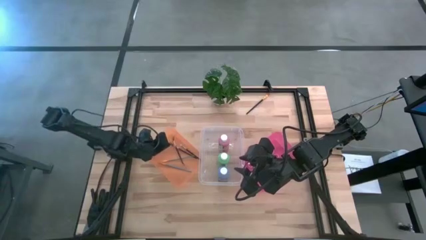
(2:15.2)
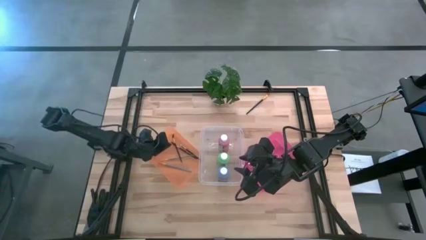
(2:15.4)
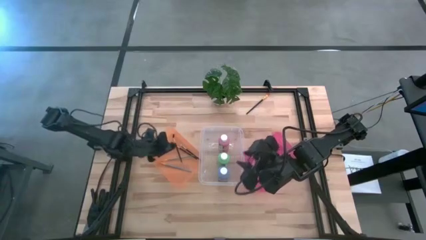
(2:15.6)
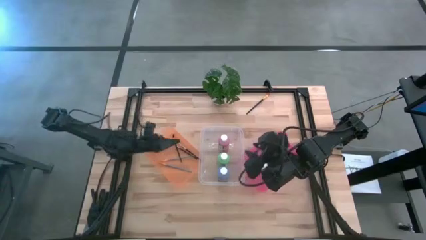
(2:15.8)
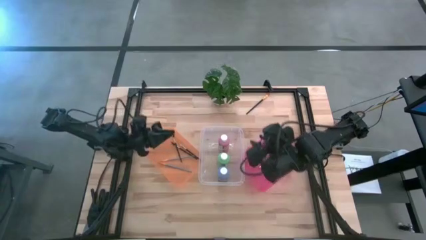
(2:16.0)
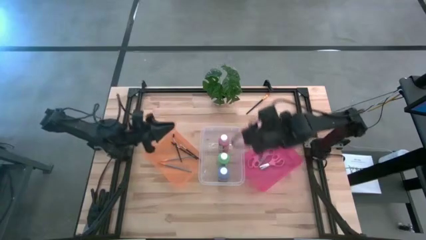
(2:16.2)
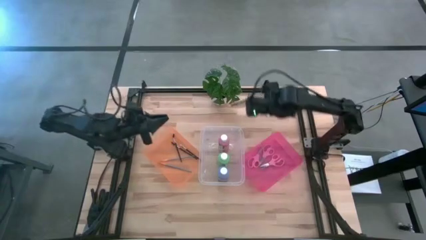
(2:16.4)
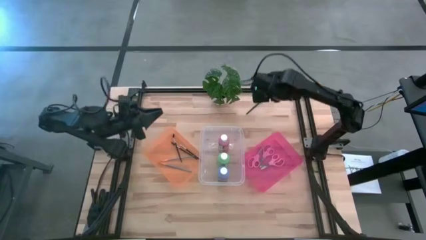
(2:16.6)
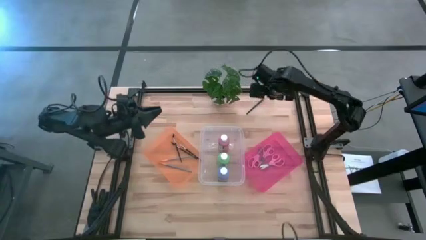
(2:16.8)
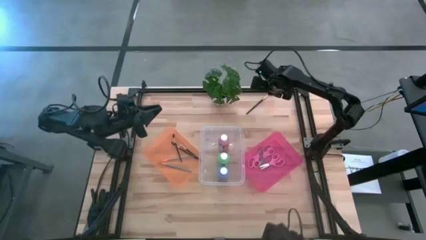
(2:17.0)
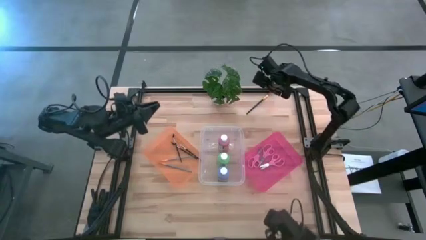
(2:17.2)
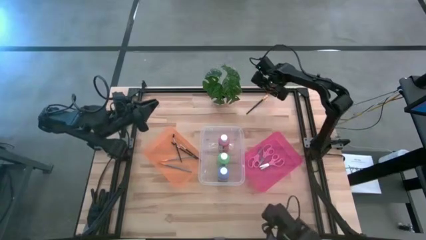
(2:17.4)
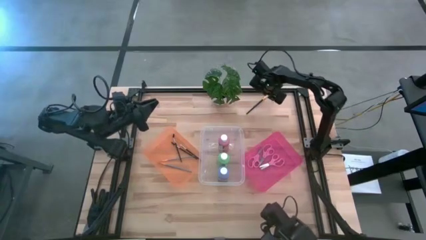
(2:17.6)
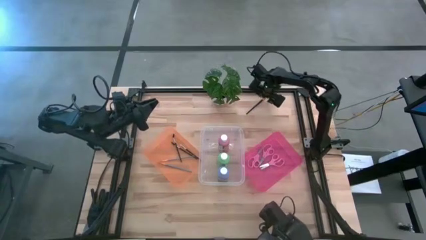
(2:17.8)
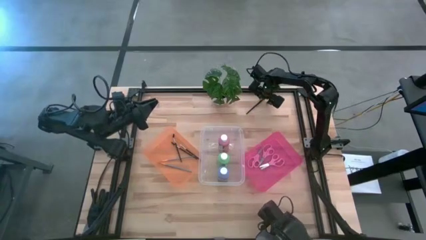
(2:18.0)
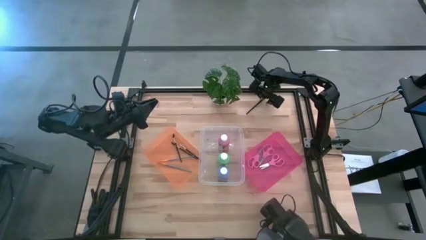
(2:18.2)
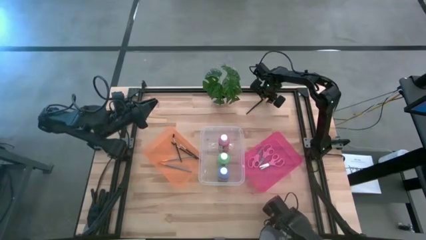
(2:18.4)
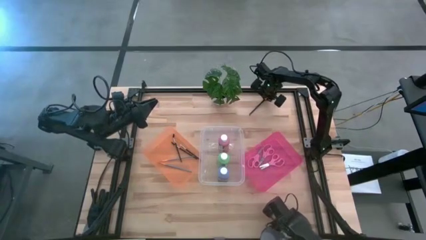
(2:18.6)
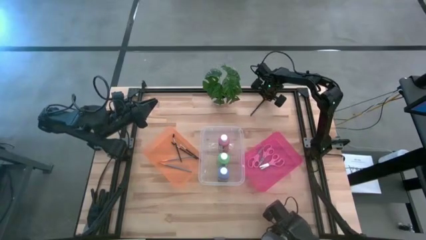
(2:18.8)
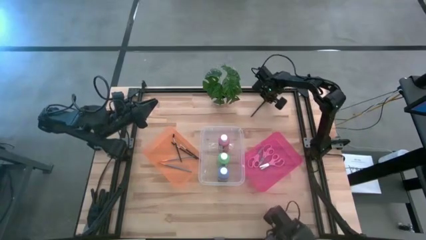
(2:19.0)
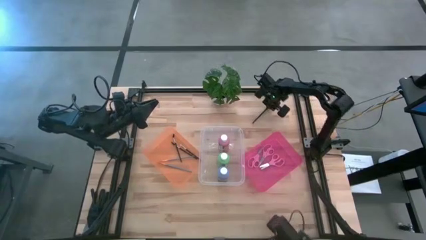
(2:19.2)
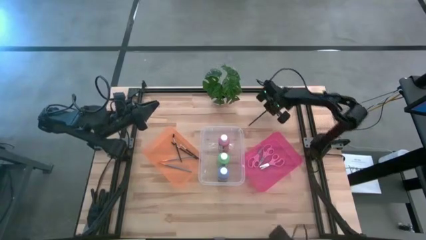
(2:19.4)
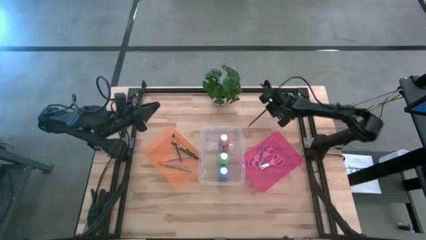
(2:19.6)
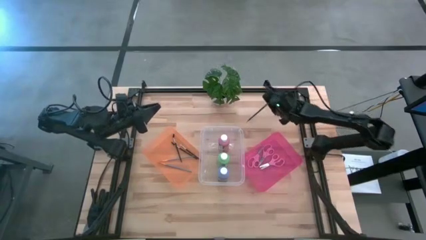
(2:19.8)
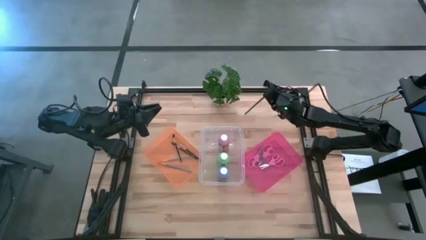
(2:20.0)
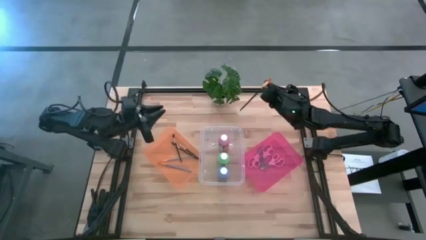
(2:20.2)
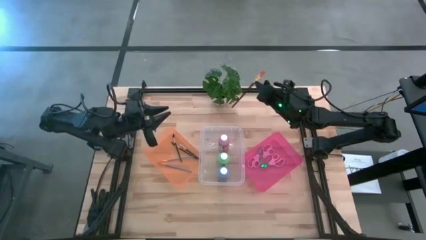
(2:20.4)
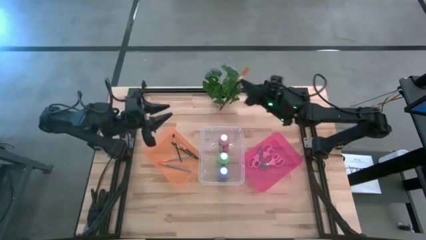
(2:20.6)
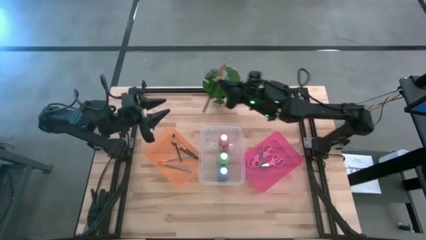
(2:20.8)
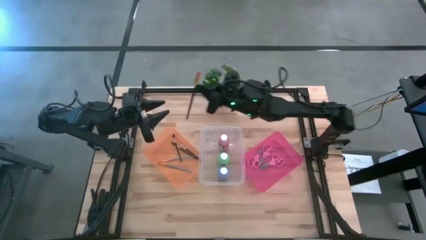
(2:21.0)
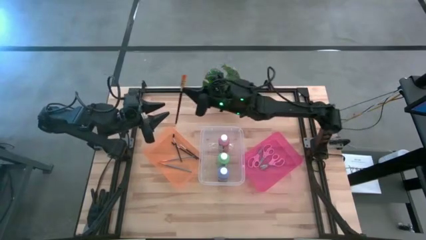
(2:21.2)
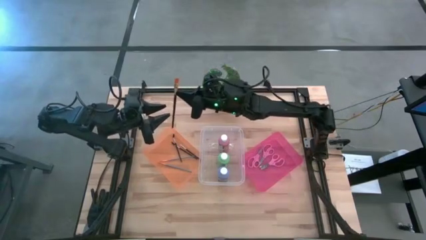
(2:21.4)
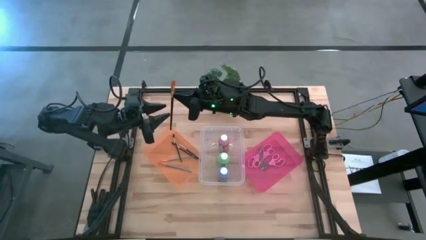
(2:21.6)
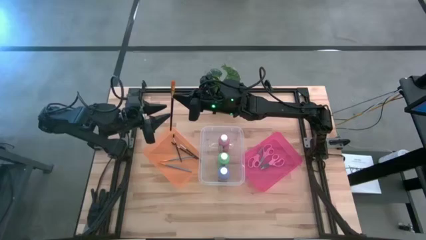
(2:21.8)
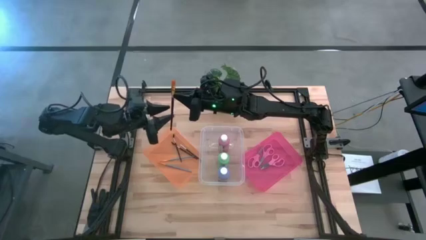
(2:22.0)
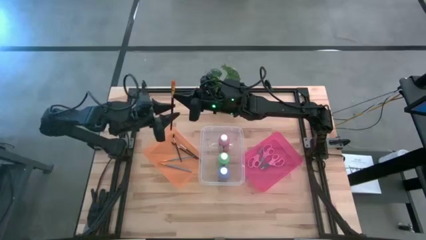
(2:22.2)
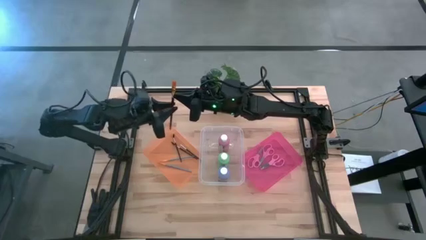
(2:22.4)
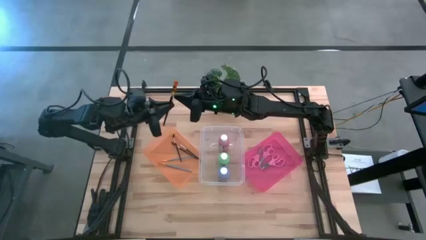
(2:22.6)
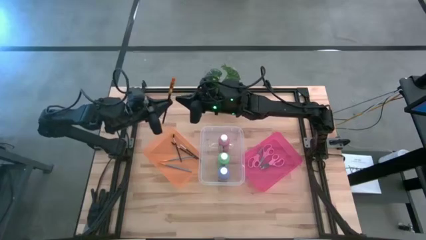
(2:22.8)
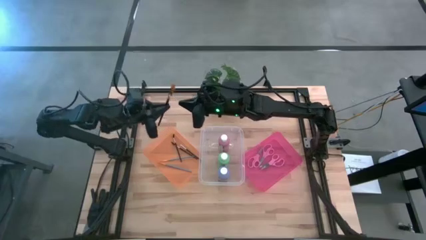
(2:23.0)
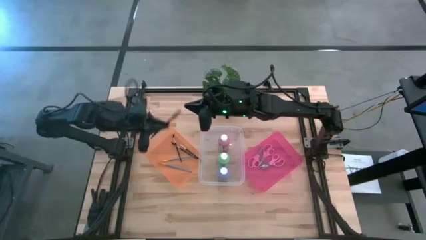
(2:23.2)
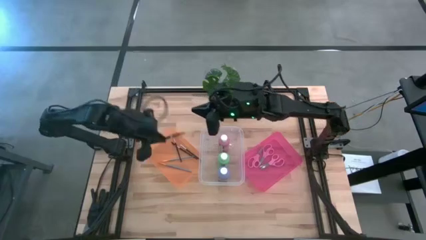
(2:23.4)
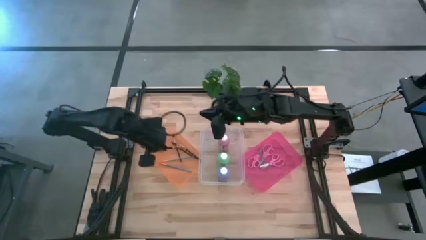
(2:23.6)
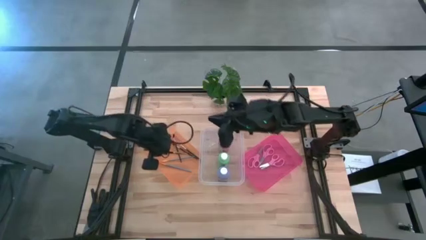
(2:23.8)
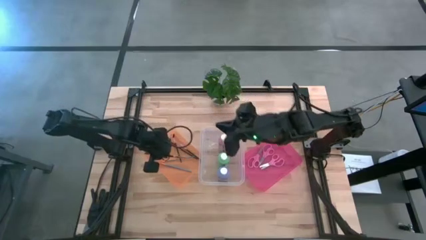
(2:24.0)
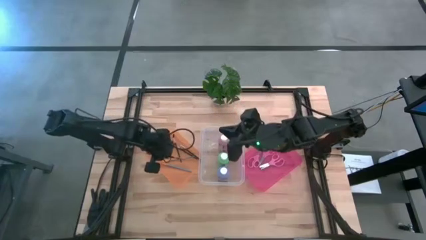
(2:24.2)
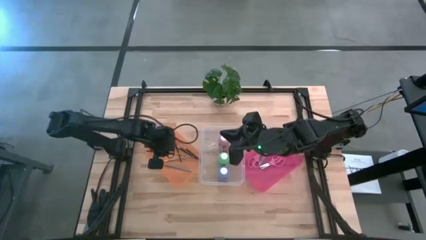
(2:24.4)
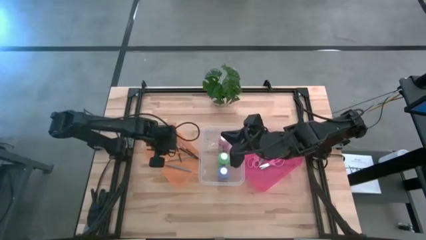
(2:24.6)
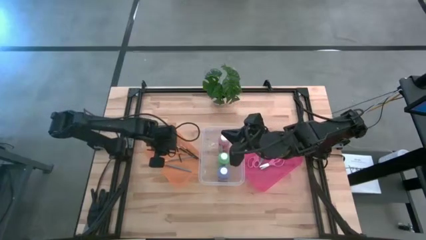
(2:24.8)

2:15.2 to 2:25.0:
Task: Pick & Place Paint Supplies
Put the black paintbrush into the orange bin

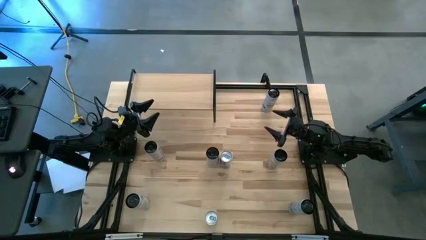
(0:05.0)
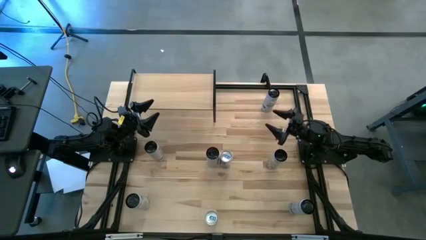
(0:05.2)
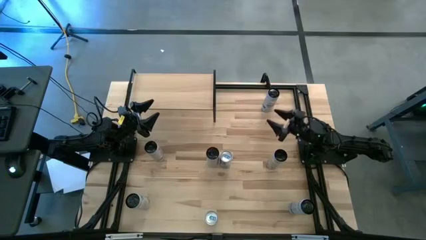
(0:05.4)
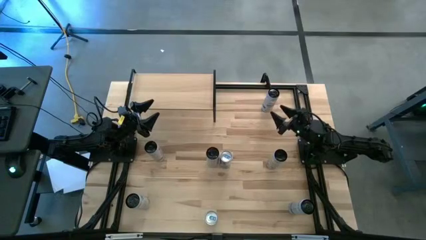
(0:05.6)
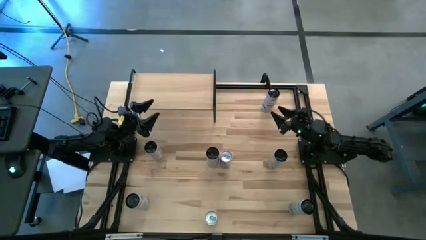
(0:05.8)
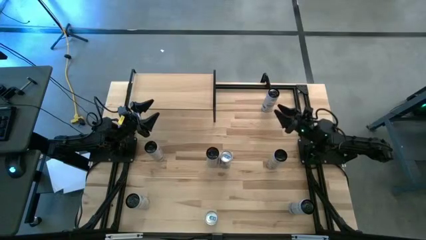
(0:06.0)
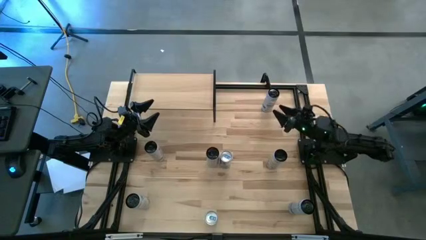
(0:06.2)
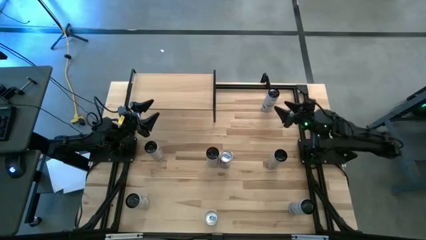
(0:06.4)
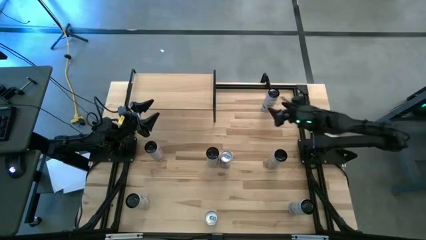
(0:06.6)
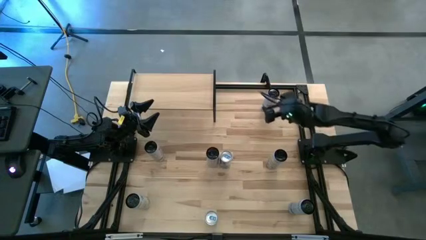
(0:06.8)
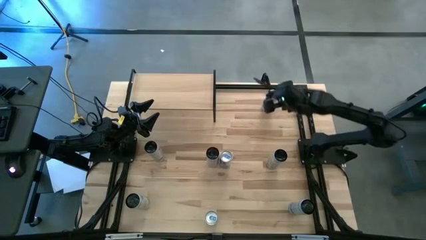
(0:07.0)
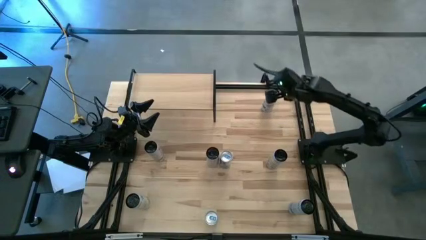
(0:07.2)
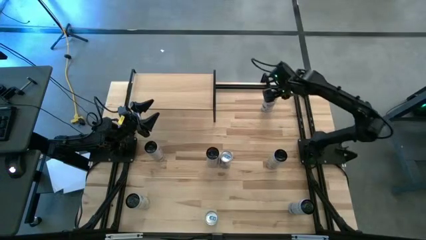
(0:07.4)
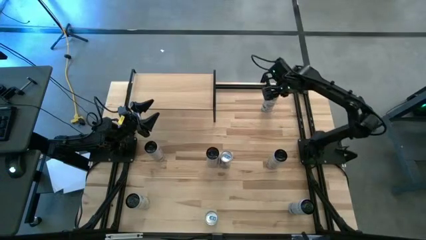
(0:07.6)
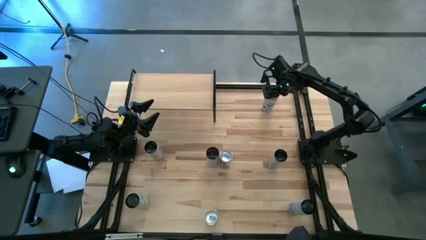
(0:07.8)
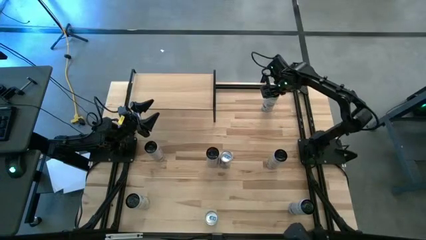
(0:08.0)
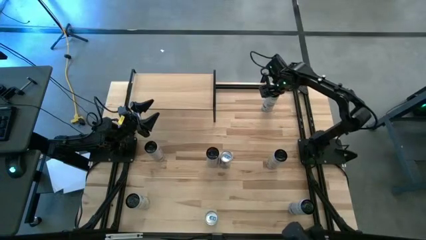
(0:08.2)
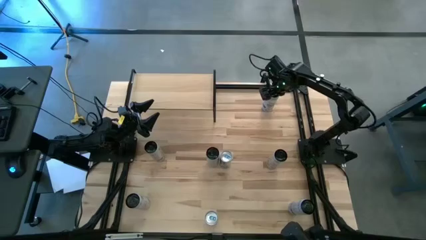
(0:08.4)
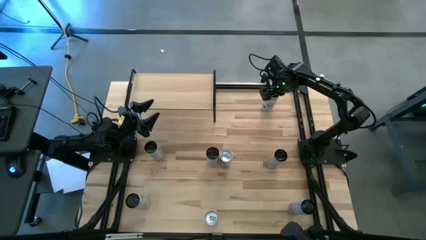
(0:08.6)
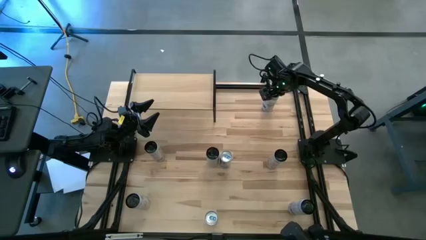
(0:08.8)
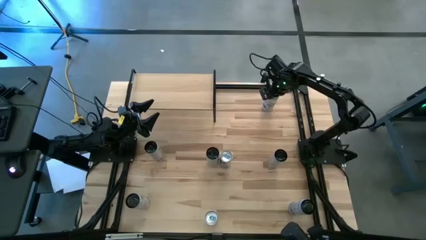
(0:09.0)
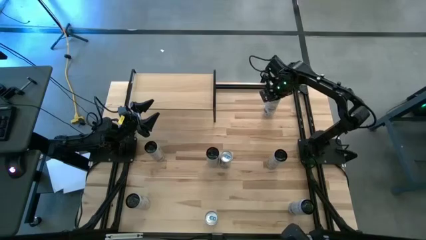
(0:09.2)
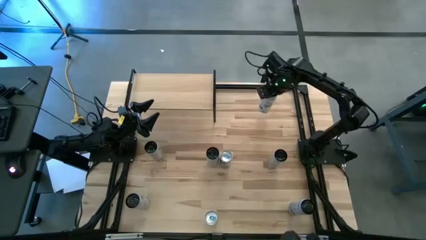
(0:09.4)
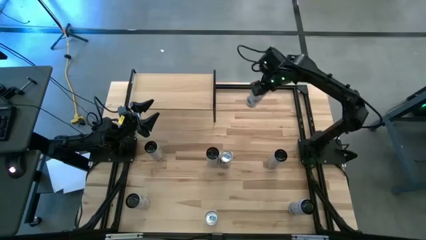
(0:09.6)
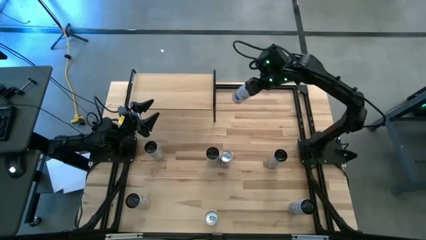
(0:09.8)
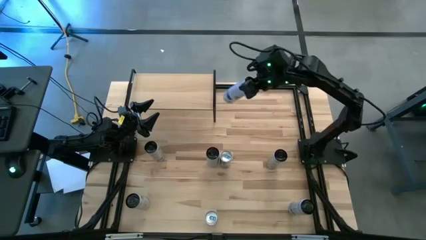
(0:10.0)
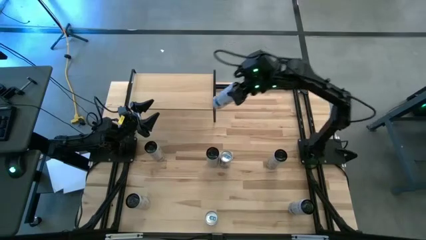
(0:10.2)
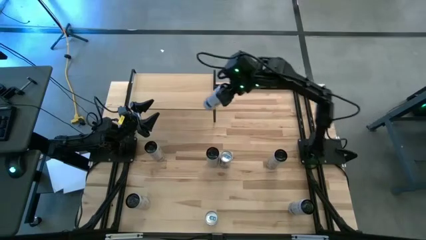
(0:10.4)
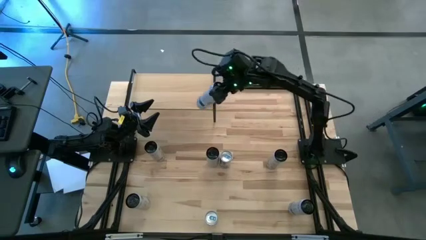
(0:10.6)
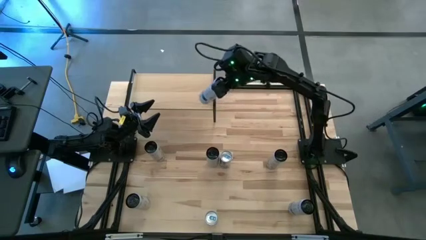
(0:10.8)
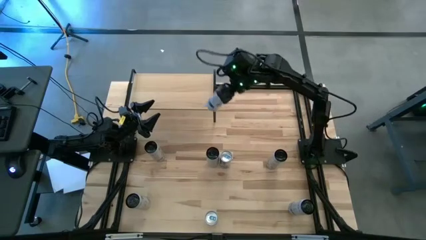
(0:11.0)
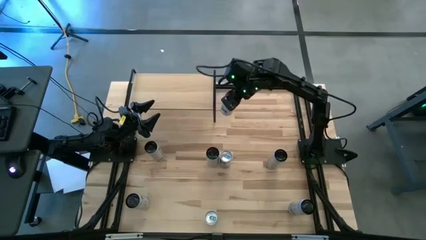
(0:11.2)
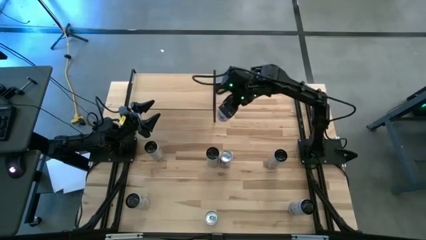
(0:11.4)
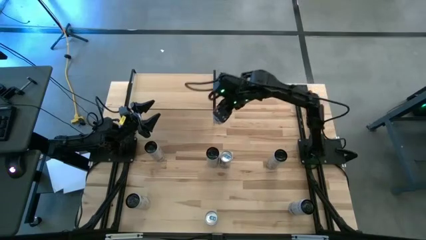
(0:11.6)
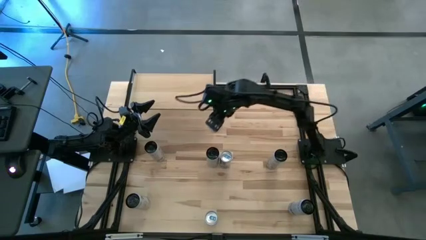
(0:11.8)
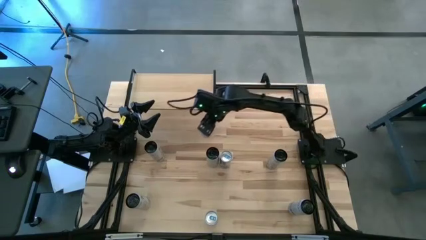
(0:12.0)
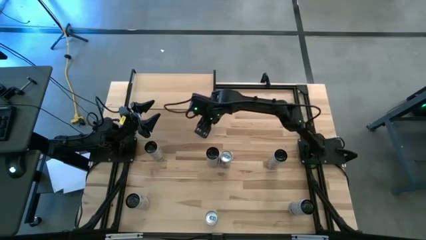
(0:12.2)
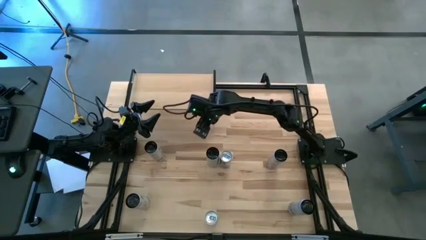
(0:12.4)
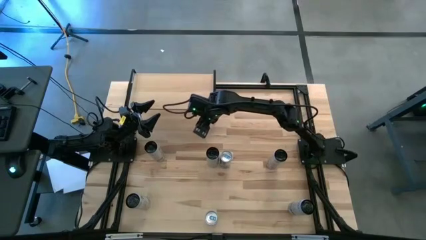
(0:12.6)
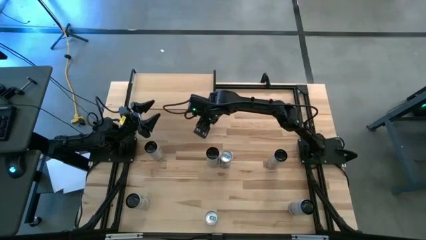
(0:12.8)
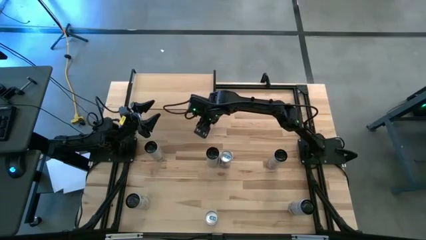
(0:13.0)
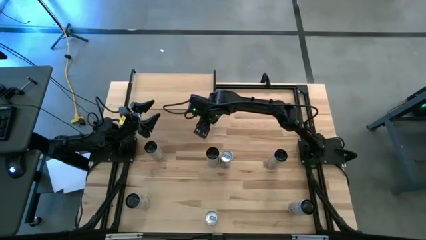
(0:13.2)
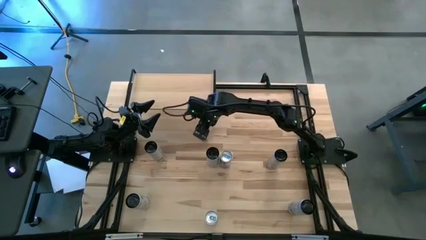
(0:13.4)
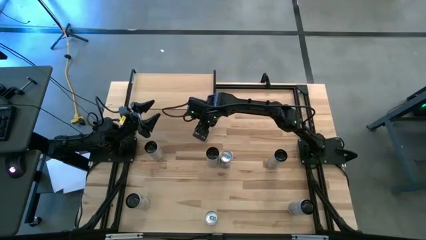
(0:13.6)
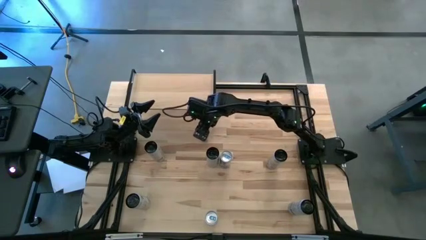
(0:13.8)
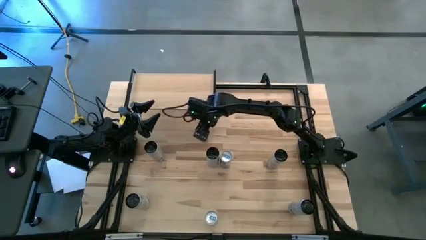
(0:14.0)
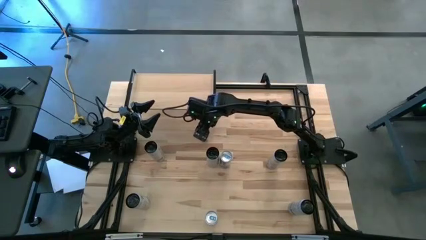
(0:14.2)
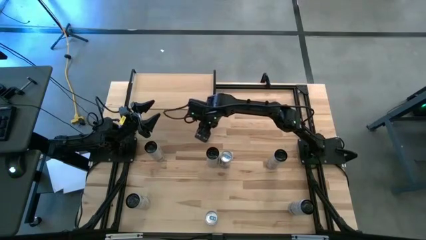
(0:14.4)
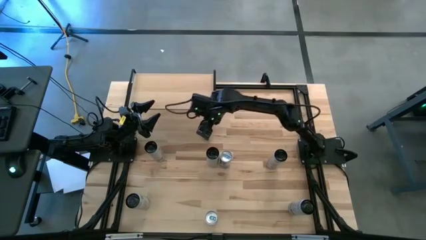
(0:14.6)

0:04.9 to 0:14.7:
Task: Place canned beverage on shelf
Move the top white blue soda can to the center of the table
